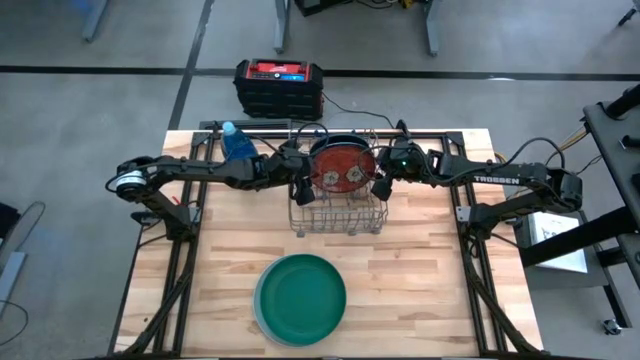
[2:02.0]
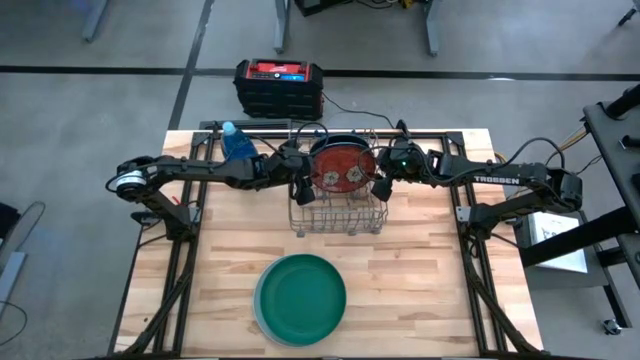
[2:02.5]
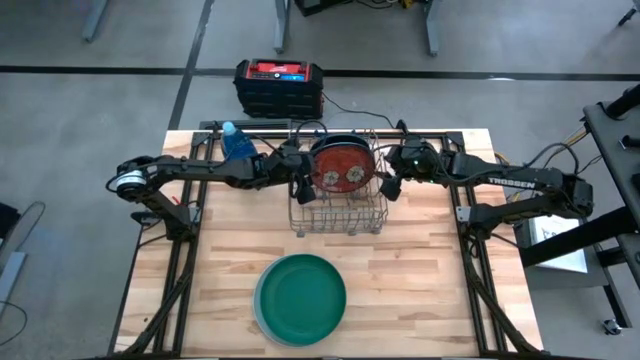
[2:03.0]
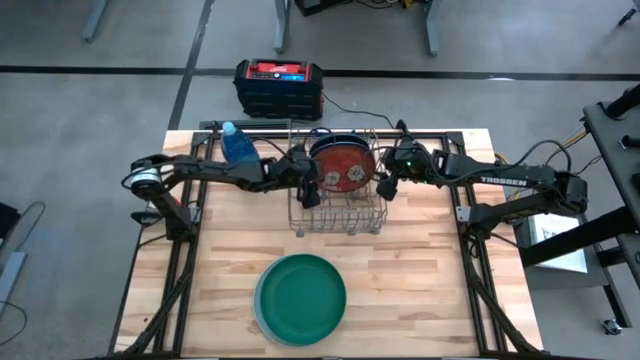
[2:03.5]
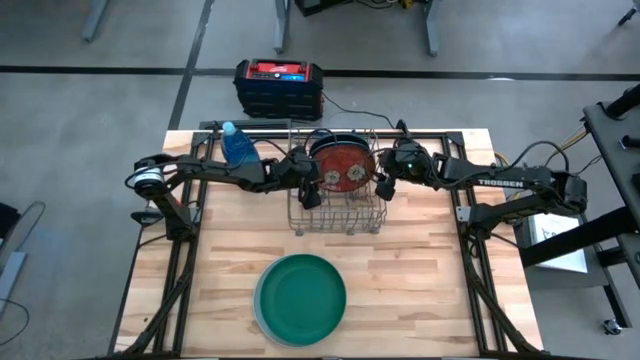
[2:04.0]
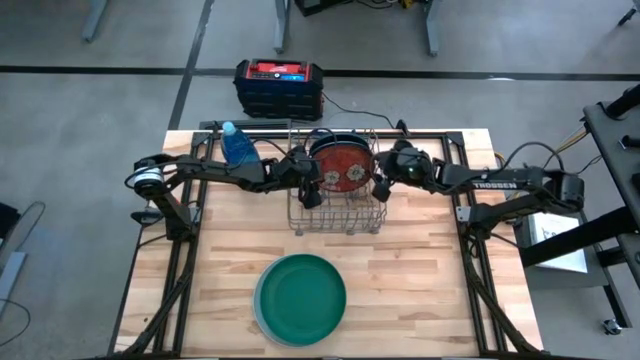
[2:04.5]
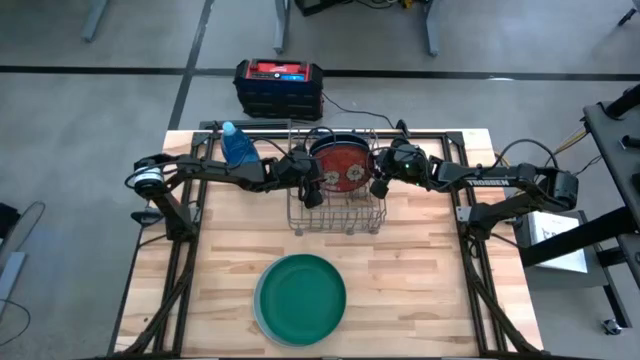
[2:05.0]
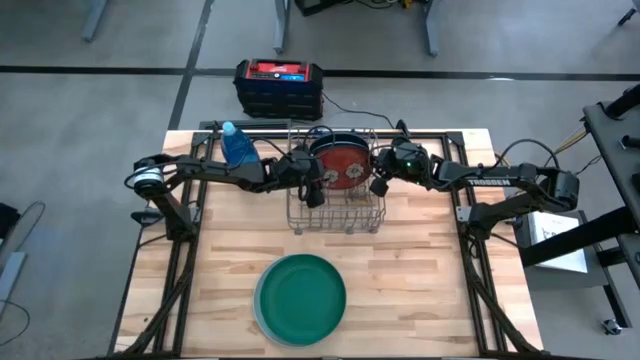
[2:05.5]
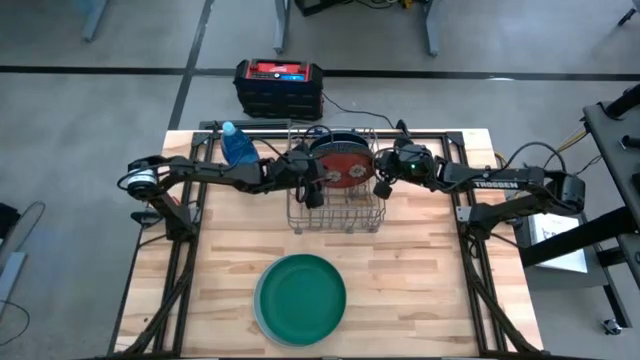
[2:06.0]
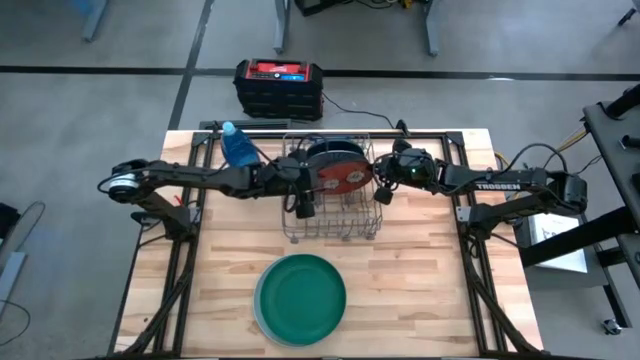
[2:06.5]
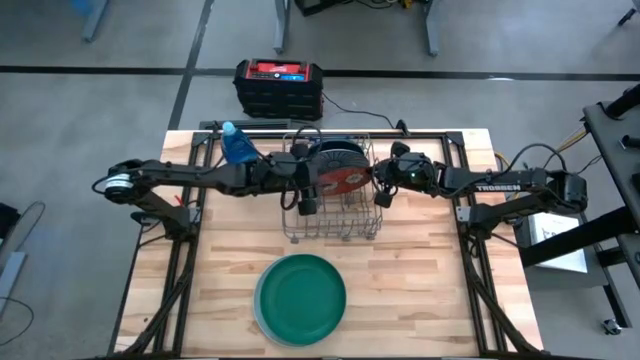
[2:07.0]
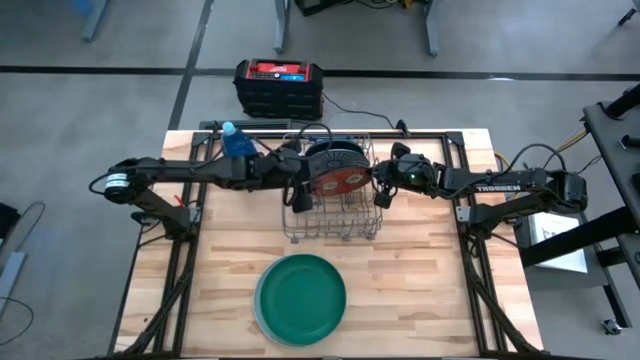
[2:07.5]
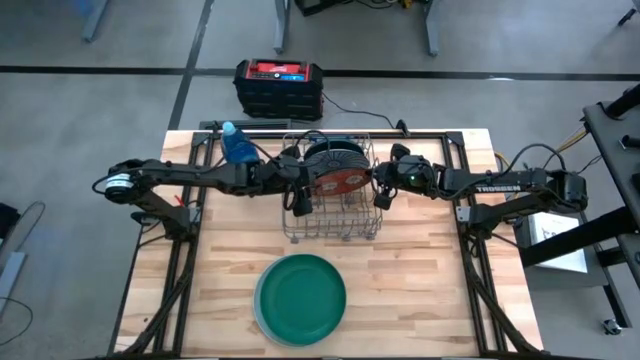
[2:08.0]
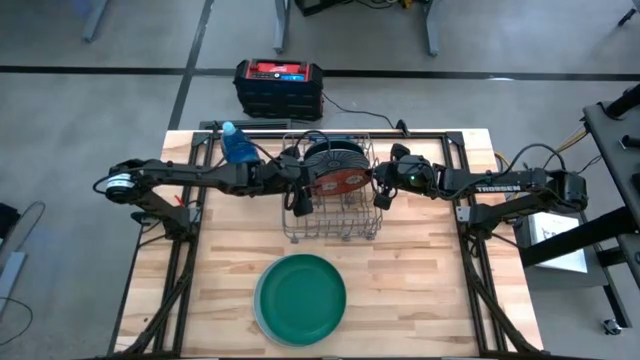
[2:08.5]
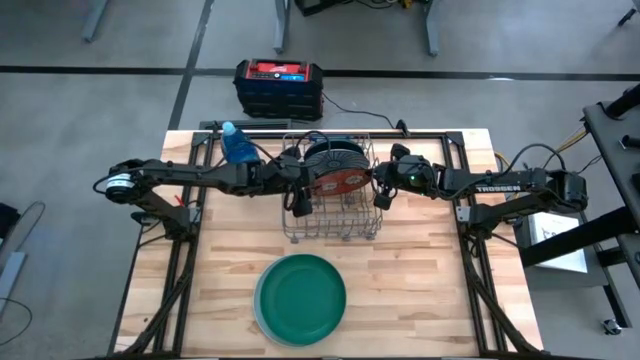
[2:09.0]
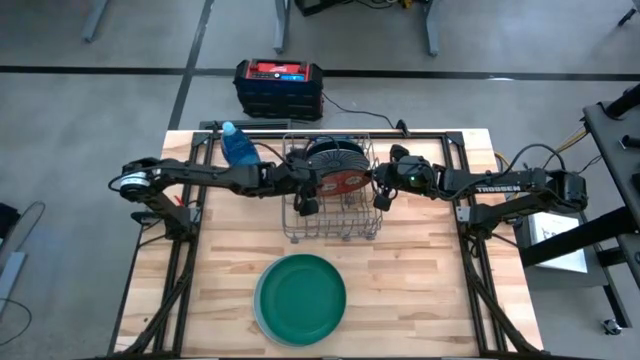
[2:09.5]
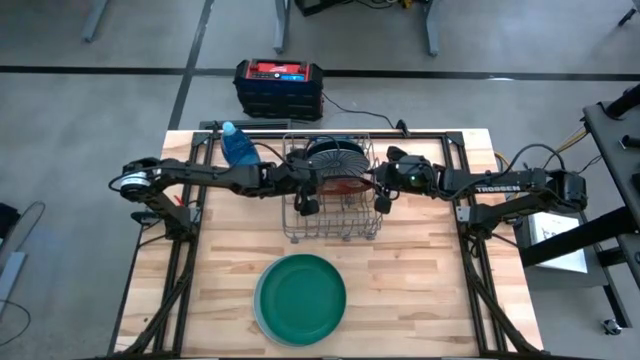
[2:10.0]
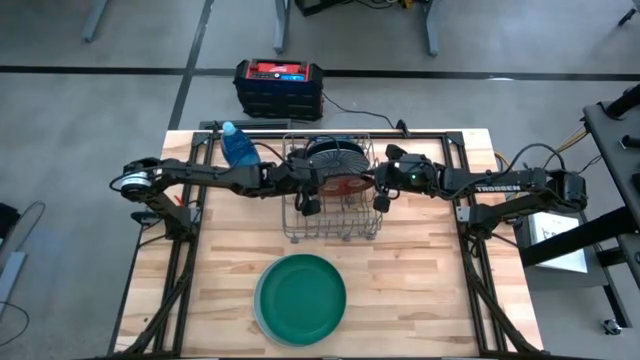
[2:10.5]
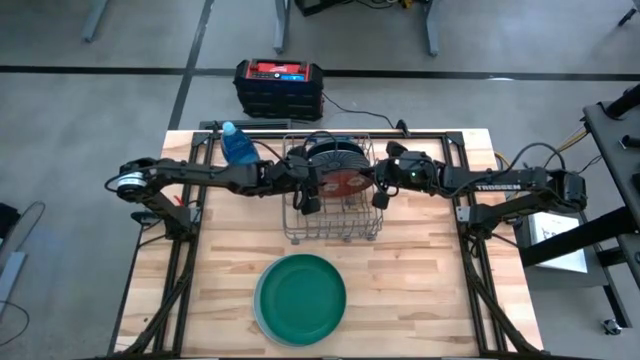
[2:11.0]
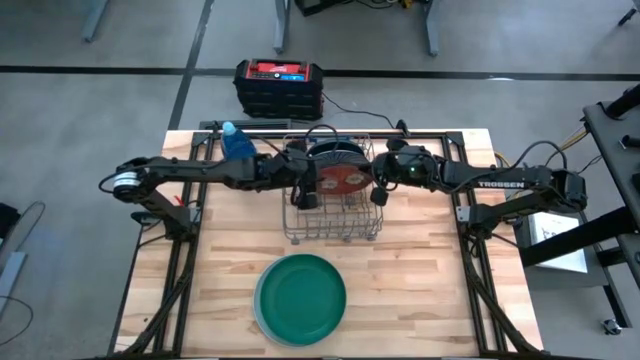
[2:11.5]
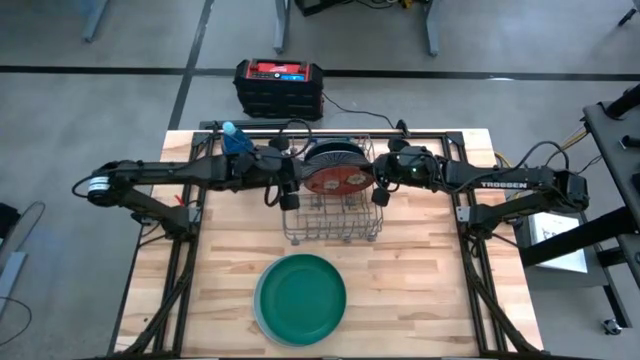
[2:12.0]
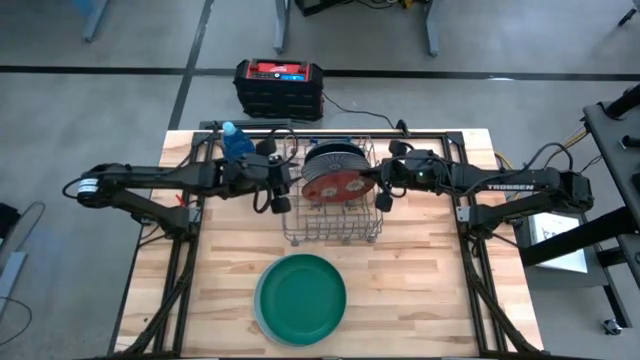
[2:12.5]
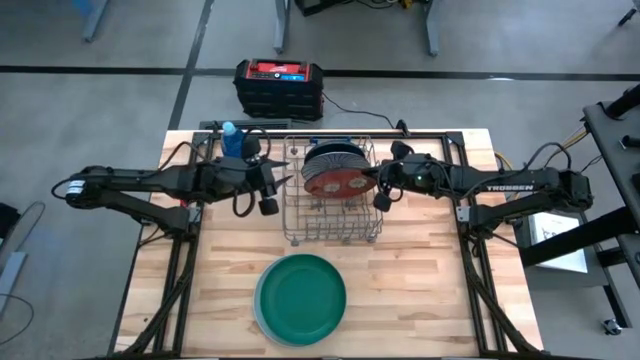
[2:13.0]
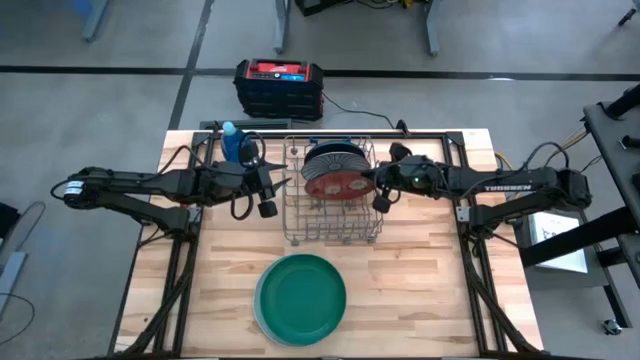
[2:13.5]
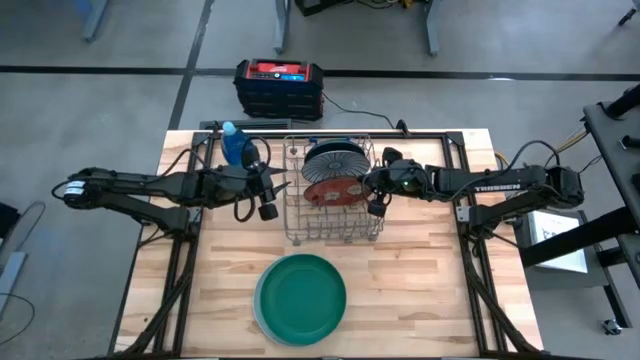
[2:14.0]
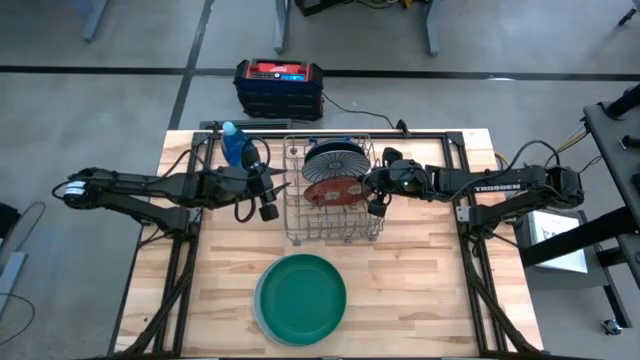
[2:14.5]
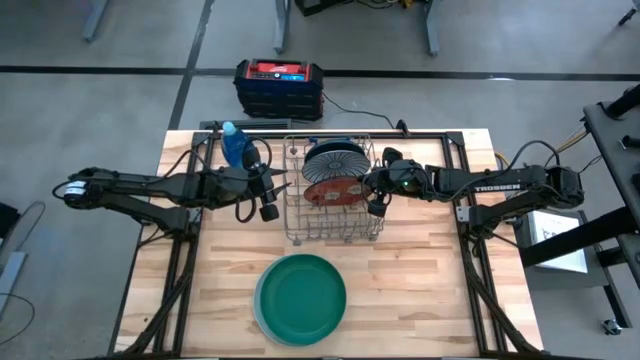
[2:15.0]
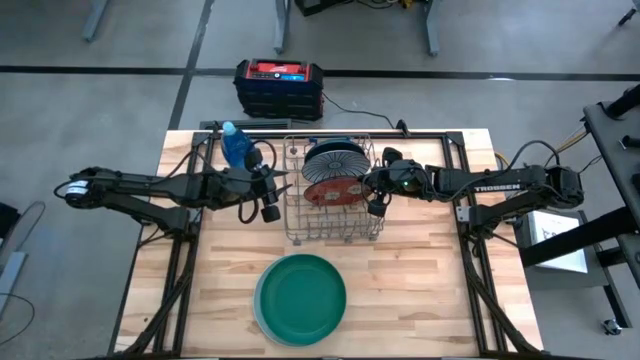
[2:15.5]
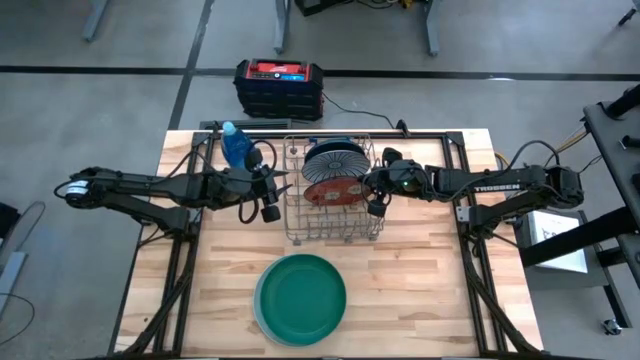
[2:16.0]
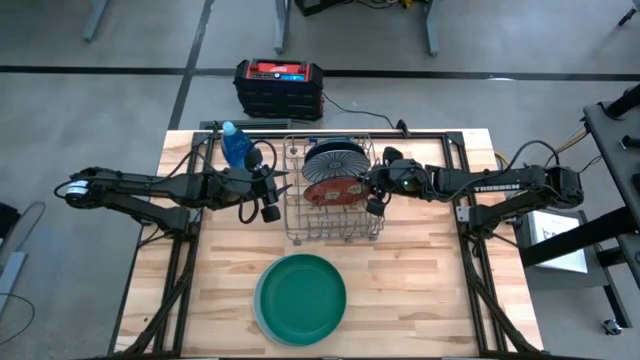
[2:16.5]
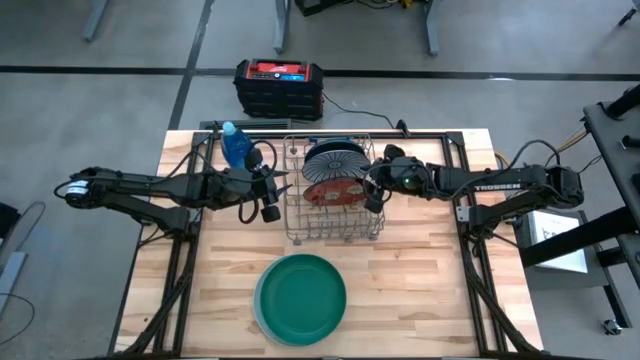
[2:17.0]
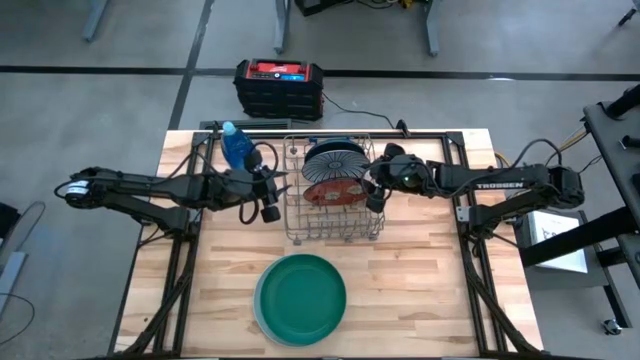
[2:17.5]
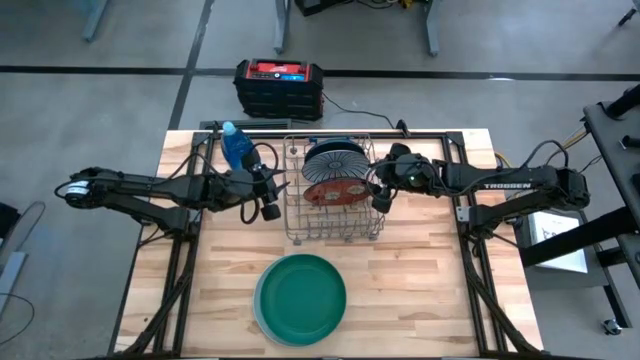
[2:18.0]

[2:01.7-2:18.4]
Task: Sort dishes
Put the red flowered plate into the gray dishwasher rack

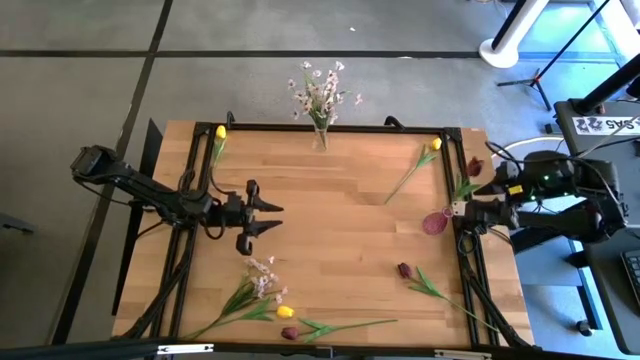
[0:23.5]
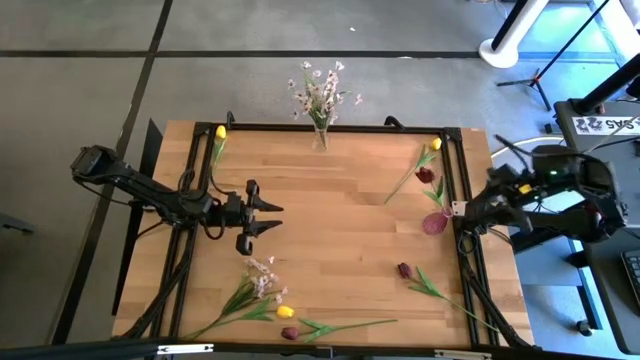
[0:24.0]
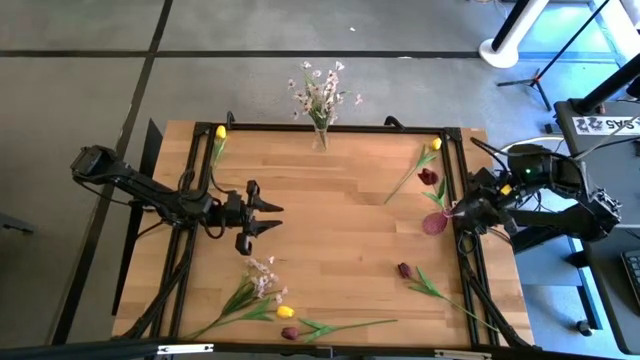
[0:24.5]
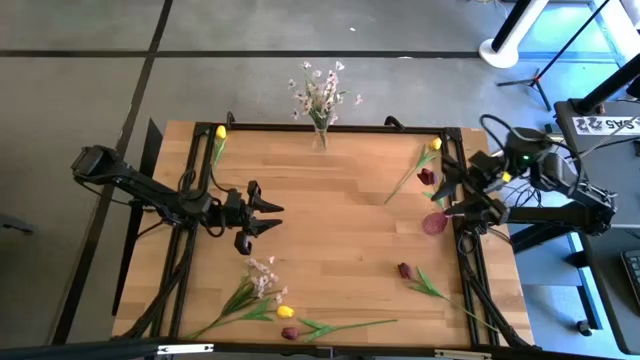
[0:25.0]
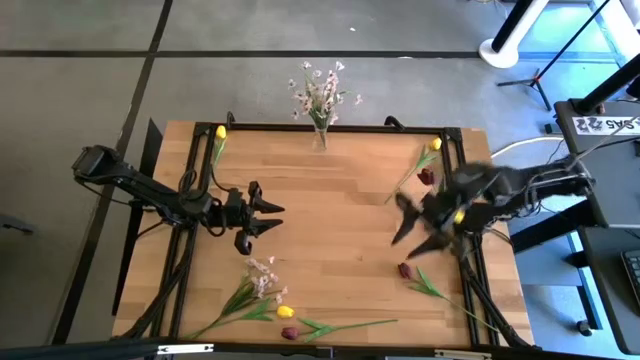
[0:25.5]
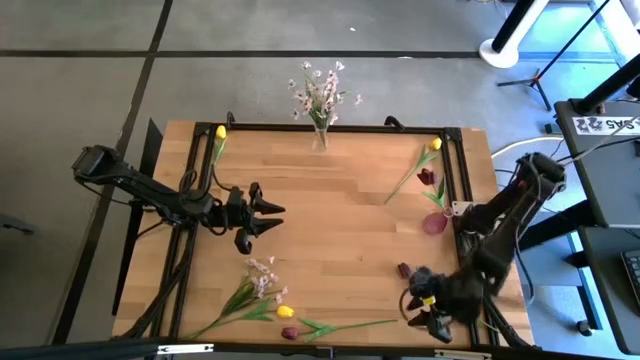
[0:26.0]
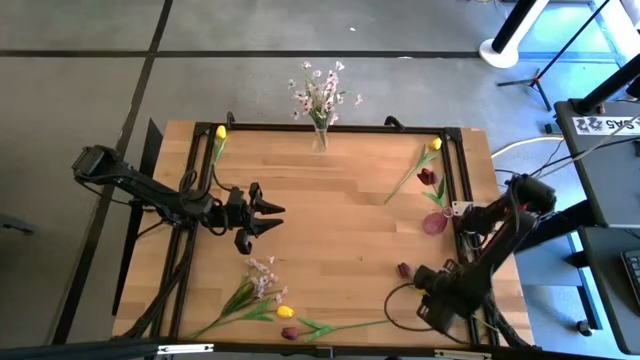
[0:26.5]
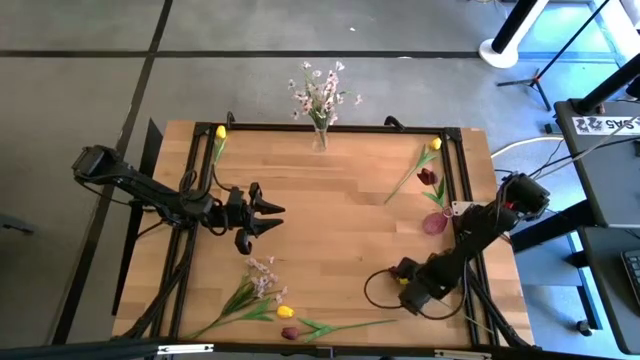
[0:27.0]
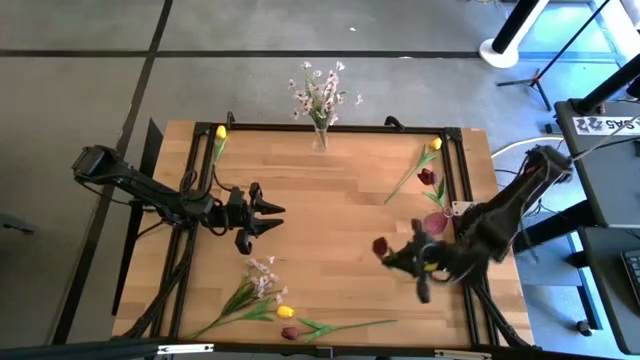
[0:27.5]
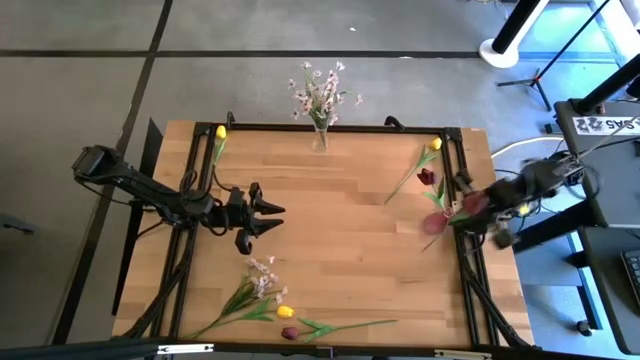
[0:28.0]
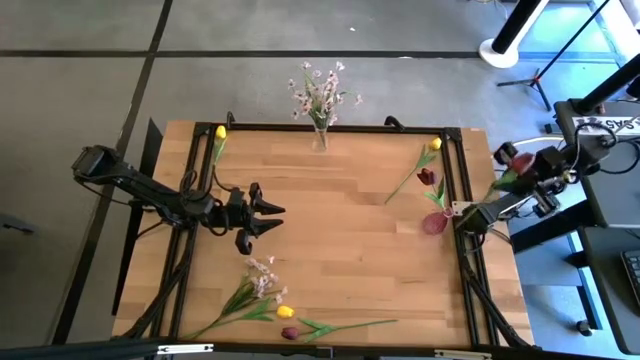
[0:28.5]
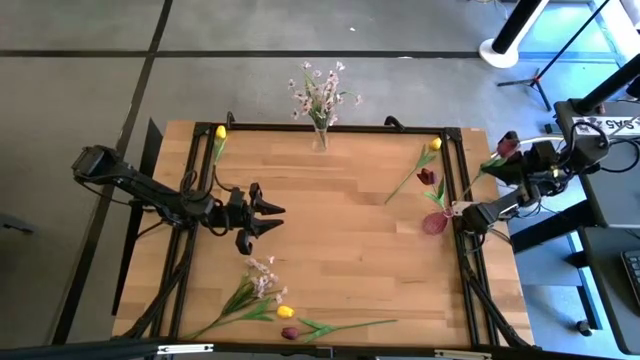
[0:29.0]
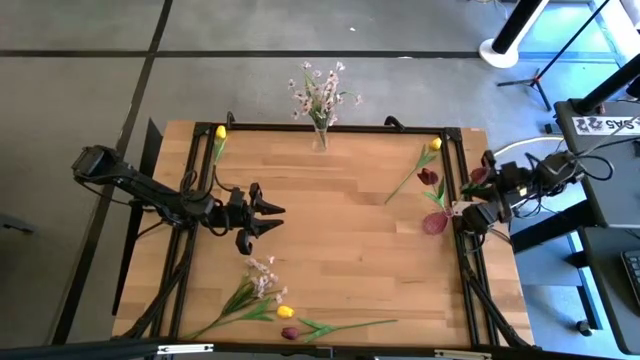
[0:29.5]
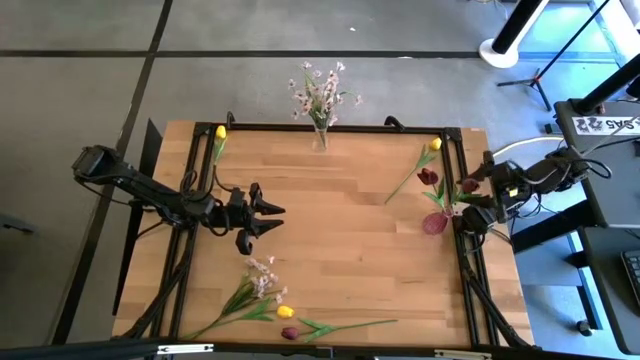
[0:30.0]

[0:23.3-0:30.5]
Task: Sort flowers into vase by color
Put the right red flower into the purple vase
